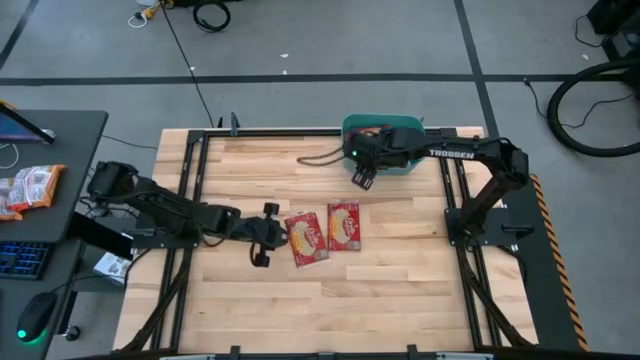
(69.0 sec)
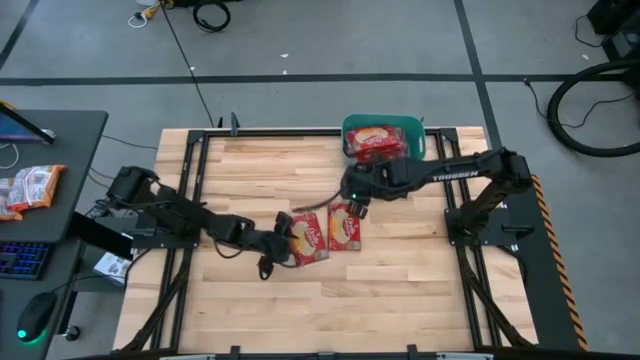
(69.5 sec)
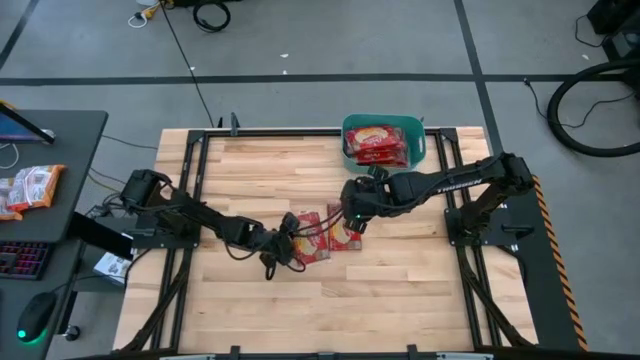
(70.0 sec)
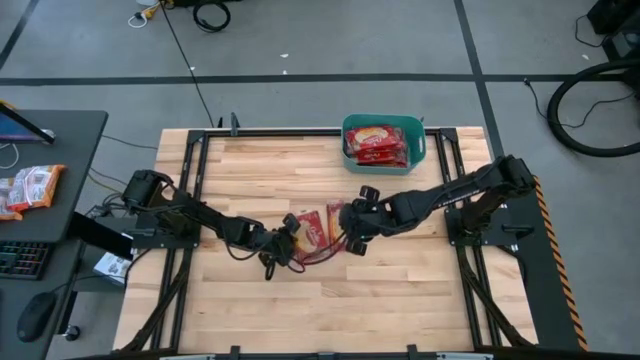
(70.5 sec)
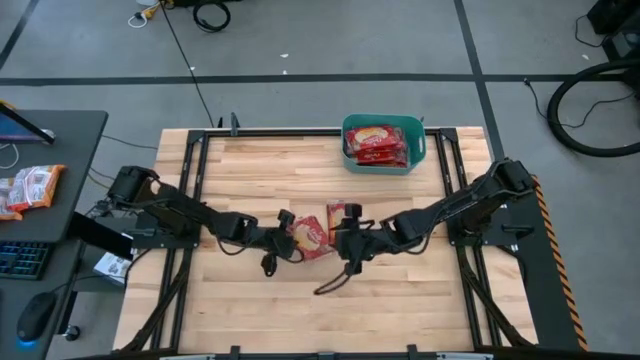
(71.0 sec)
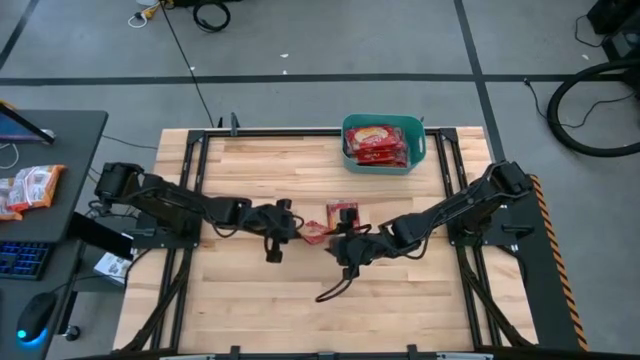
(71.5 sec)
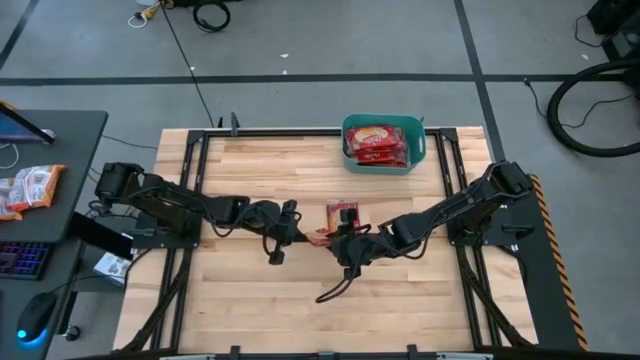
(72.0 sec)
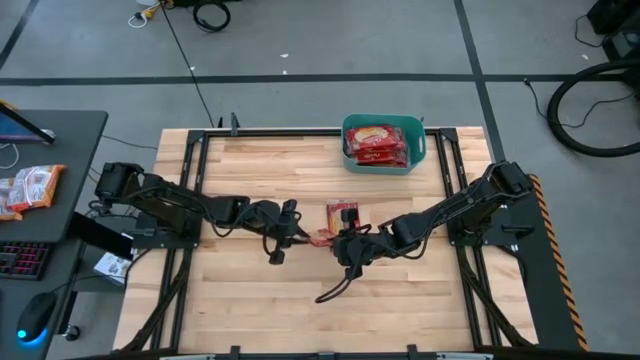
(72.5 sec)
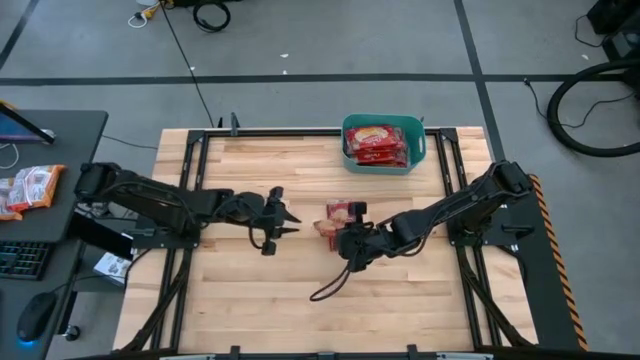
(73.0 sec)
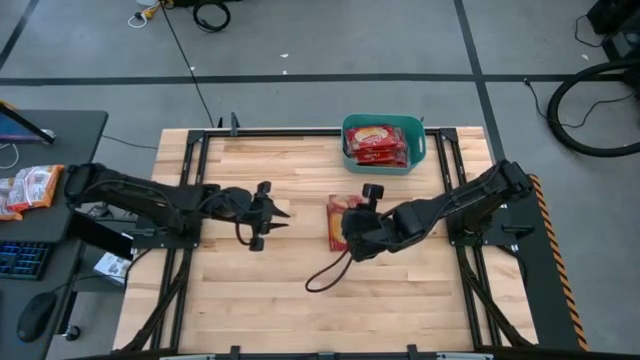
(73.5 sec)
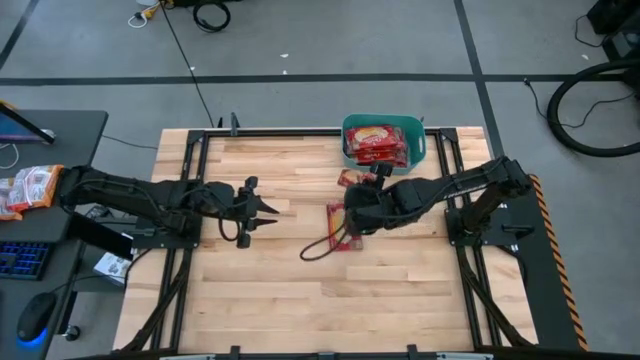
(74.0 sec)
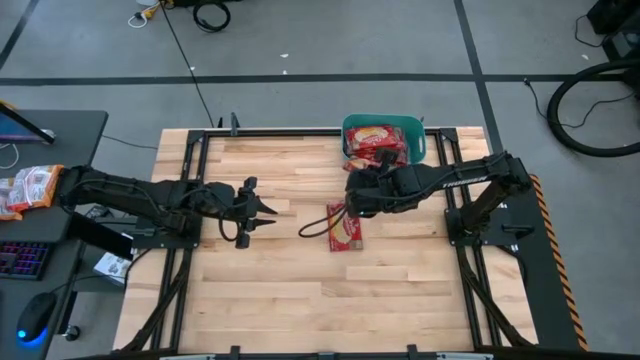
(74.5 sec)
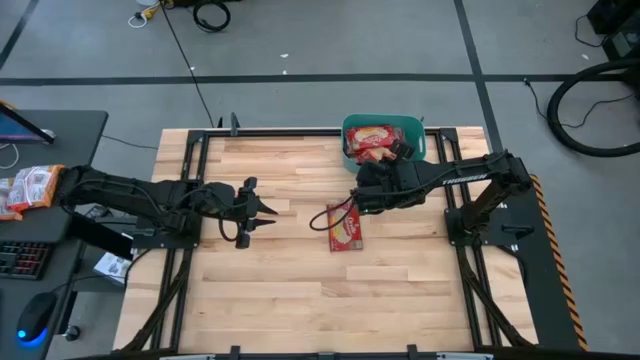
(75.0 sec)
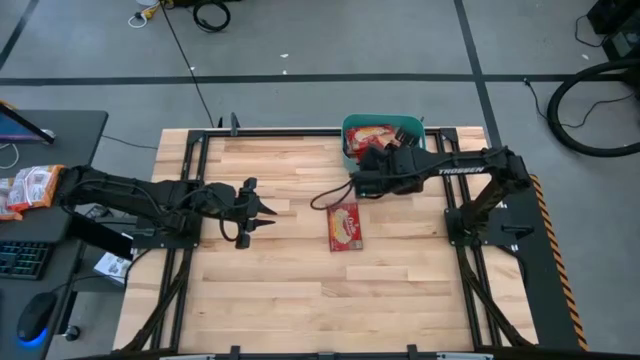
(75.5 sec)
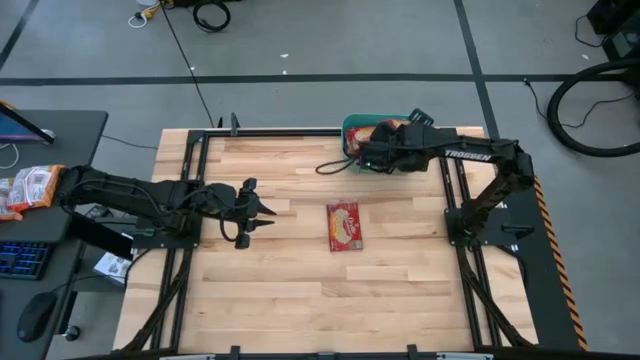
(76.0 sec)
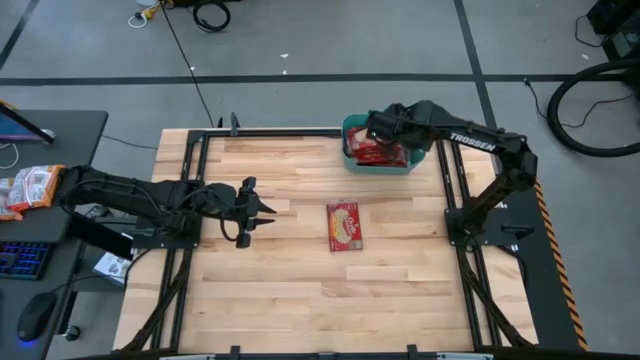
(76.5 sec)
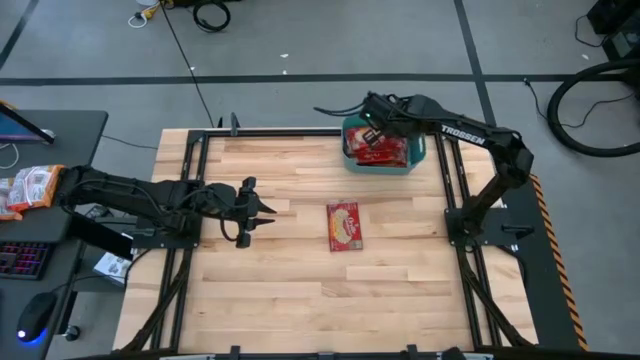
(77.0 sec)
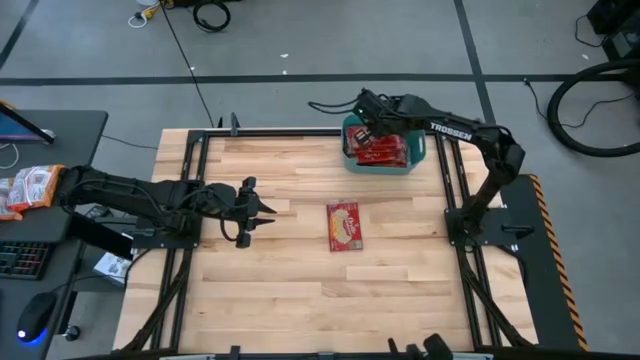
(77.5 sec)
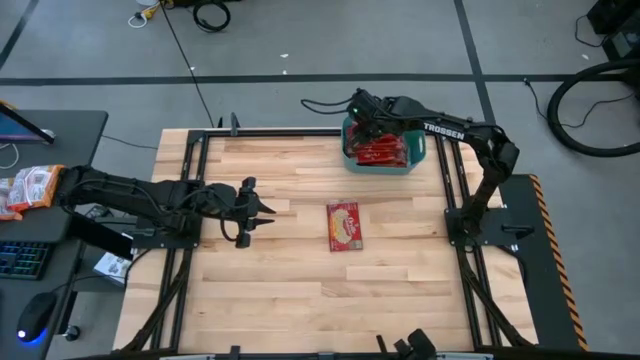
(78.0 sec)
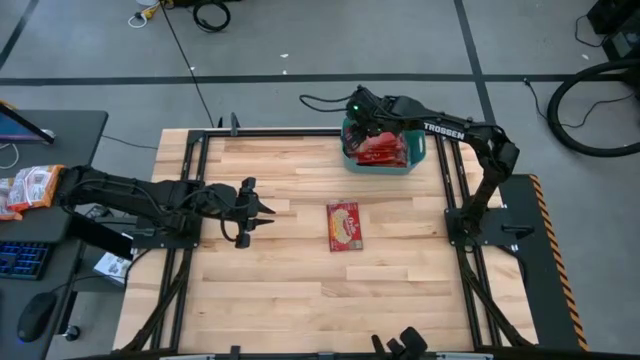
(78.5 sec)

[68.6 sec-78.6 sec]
Task: Sort popcorn bags into baskets
Put the popcorn bag into the green bin

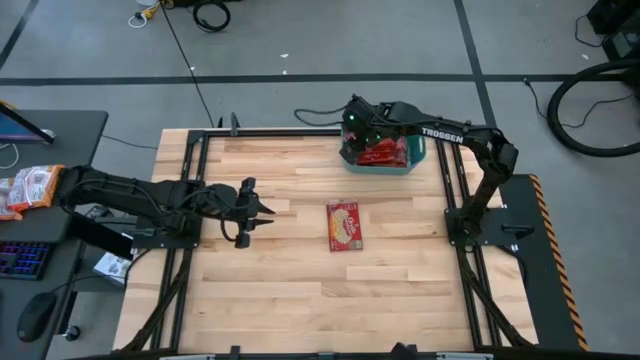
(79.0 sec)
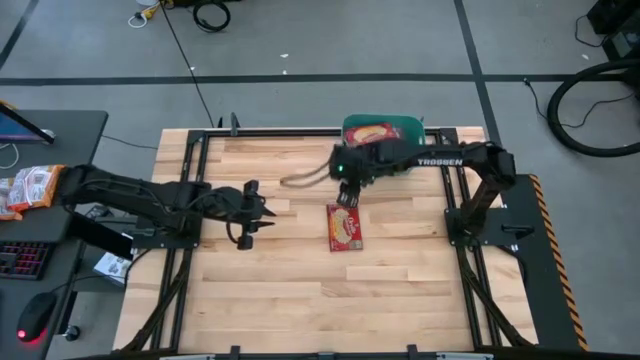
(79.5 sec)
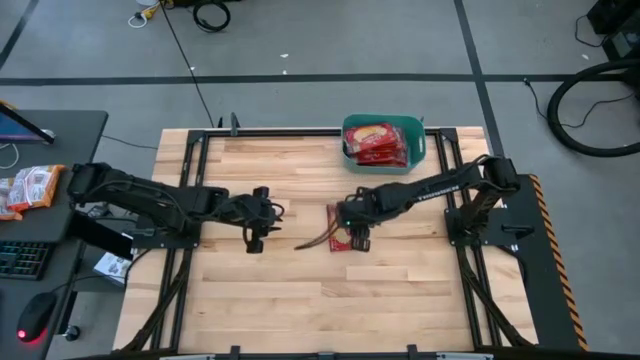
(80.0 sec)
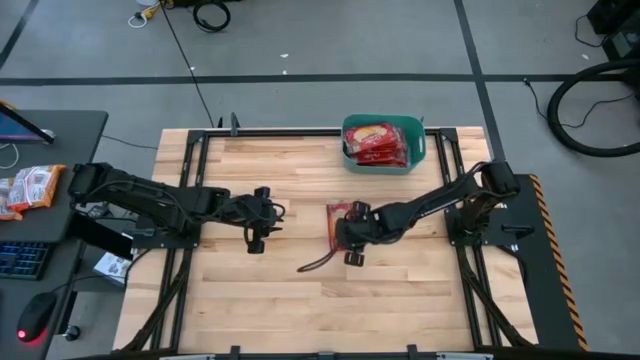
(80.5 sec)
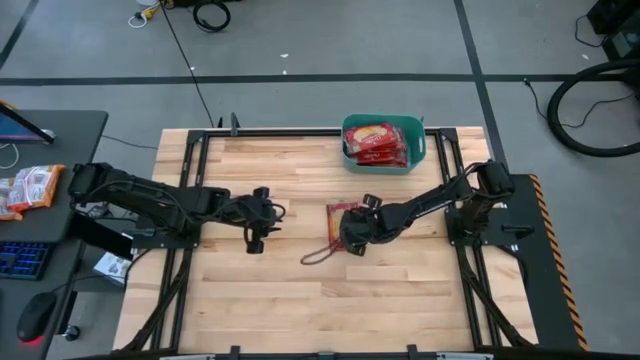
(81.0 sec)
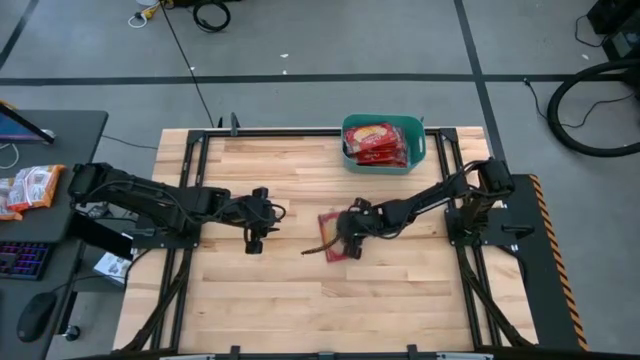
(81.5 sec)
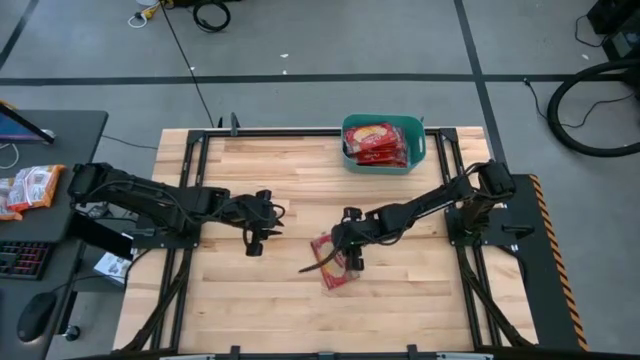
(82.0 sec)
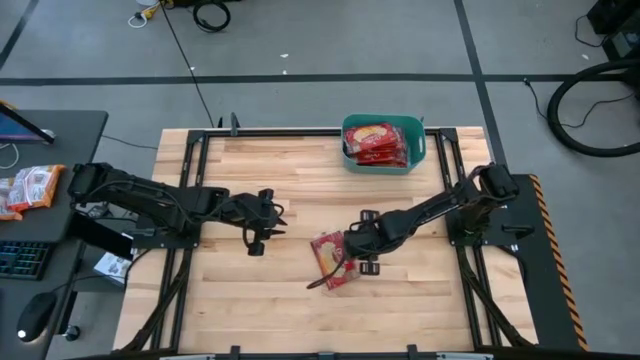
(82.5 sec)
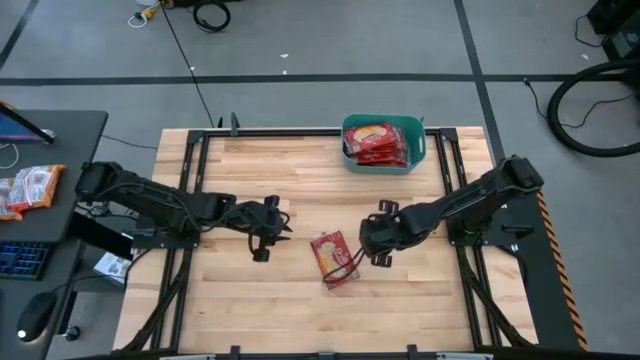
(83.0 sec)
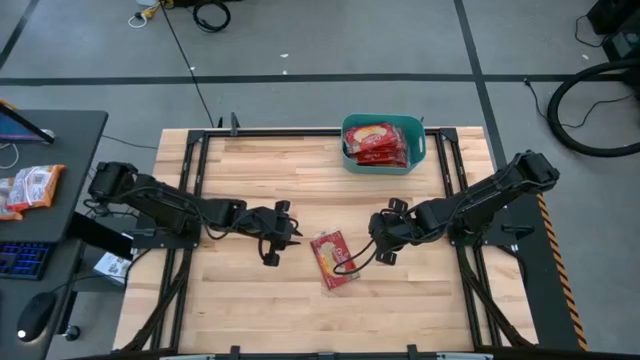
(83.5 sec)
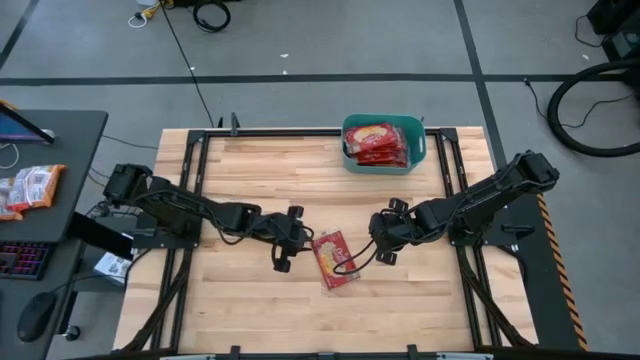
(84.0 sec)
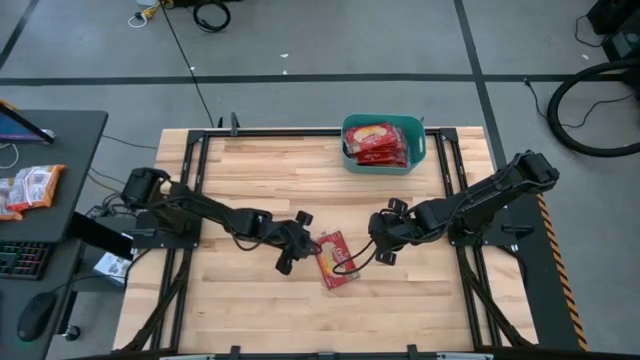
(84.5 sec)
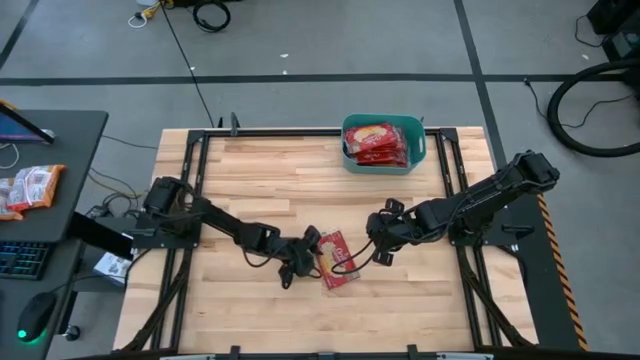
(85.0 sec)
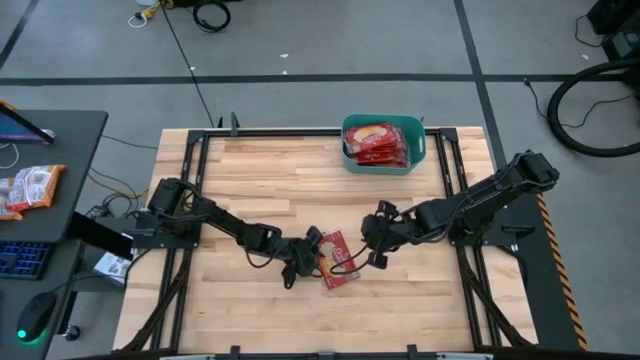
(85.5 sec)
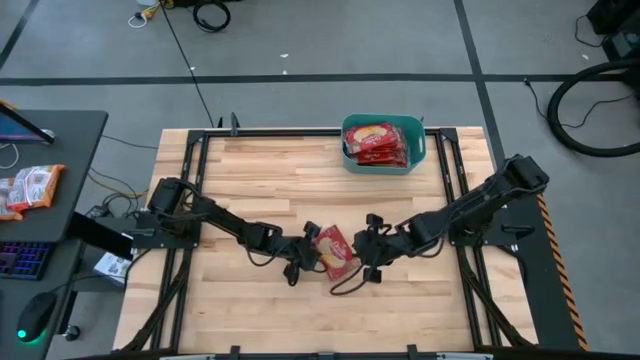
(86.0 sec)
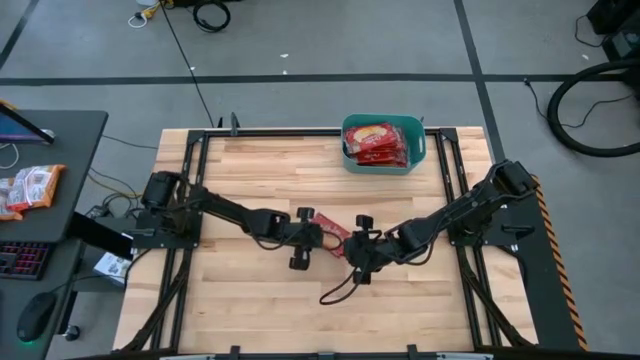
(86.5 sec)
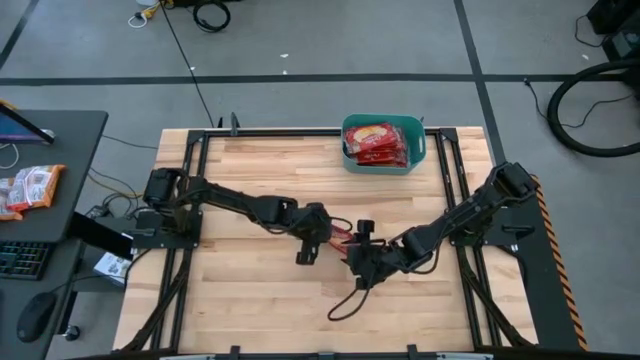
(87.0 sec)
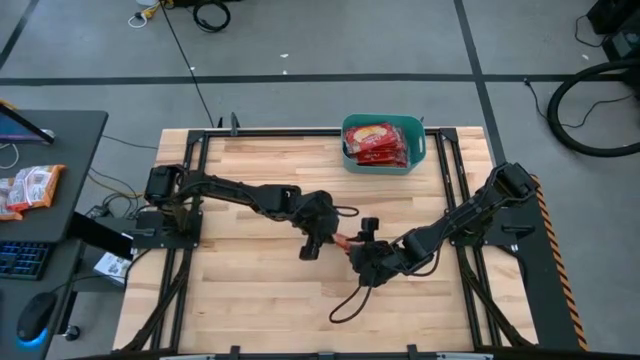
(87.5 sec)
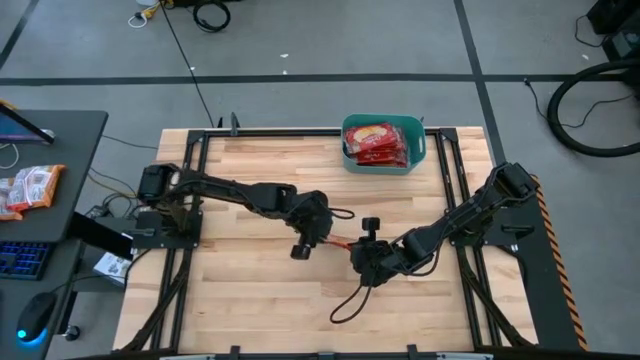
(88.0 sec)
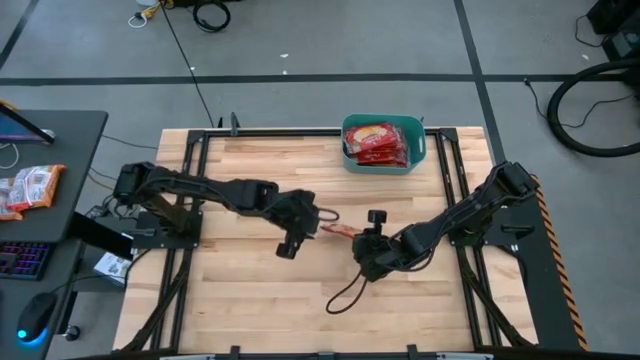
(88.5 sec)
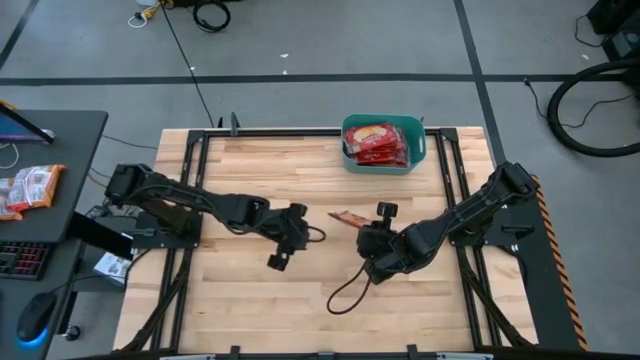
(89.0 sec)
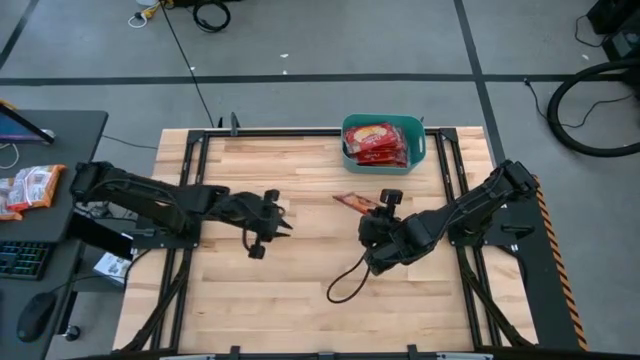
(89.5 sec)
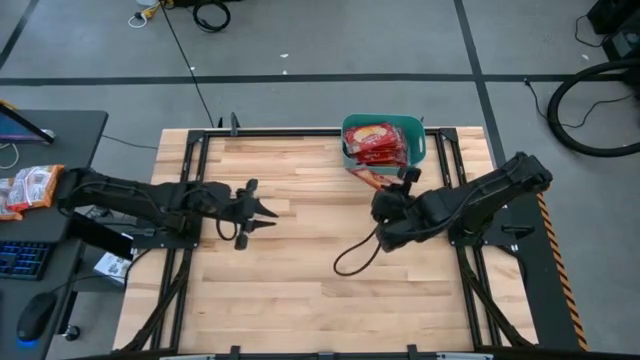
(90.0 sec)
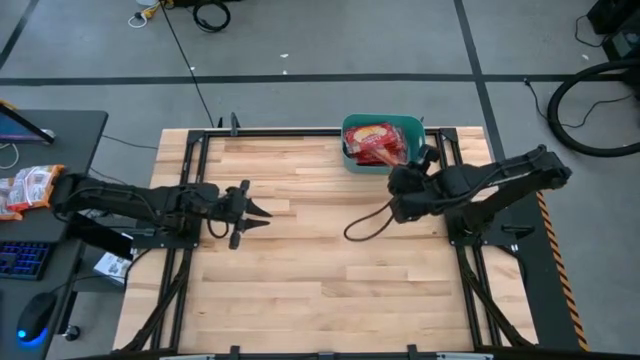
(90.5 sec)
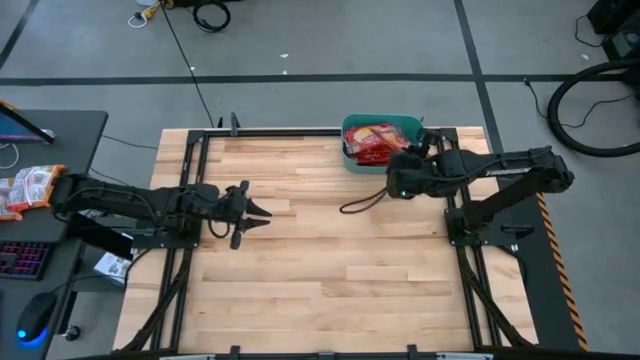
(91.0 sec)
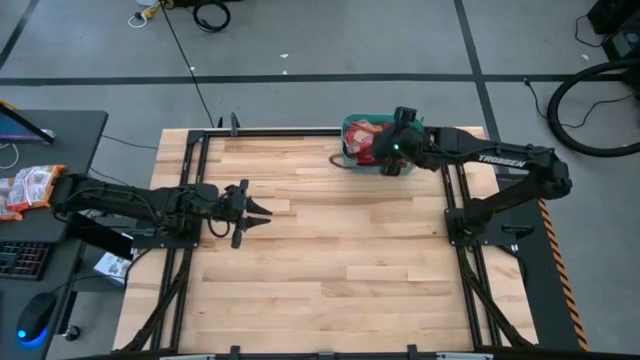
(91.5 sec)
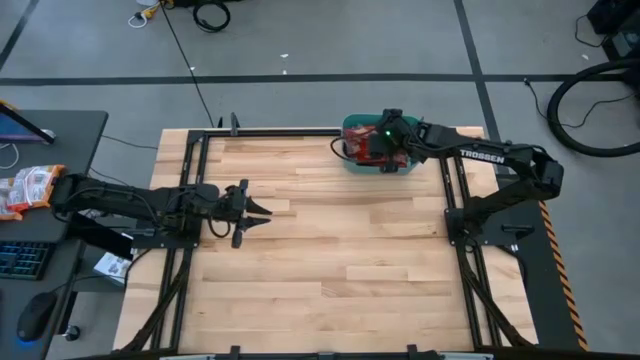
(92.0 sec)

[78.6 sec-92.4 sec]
Put the popcorn bag into the green bin
